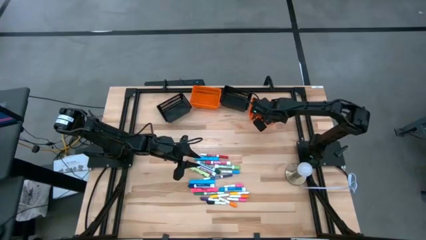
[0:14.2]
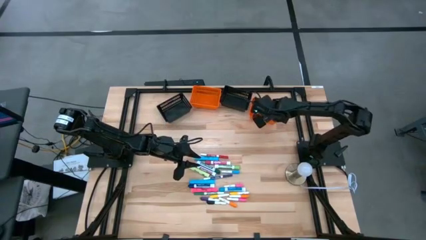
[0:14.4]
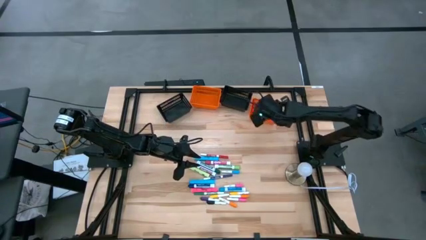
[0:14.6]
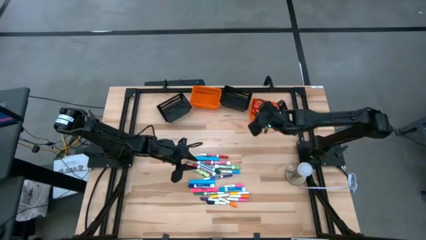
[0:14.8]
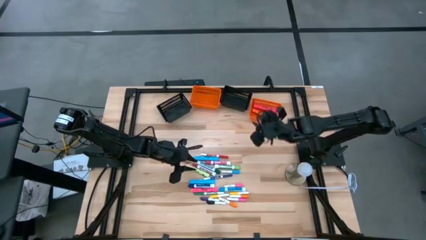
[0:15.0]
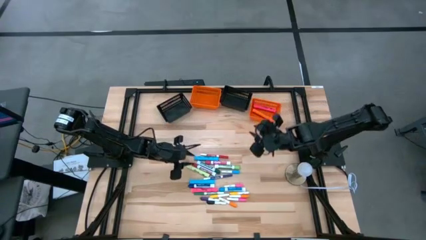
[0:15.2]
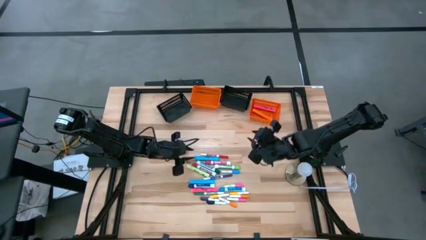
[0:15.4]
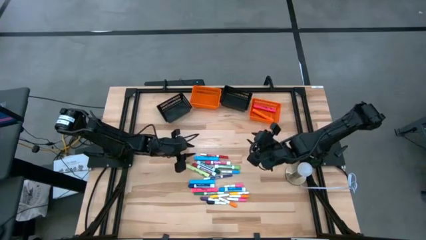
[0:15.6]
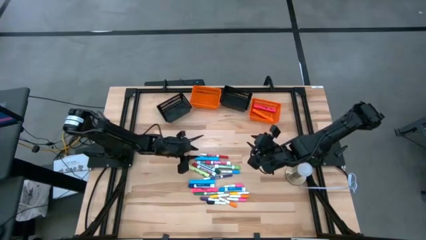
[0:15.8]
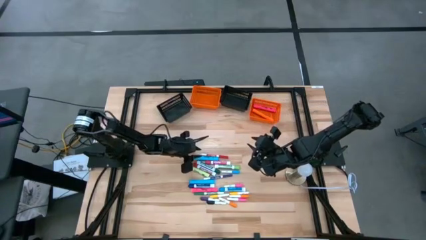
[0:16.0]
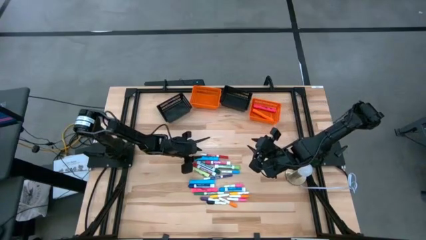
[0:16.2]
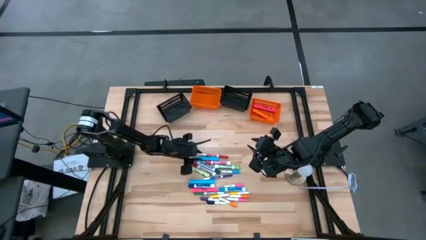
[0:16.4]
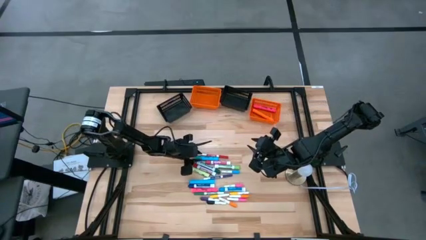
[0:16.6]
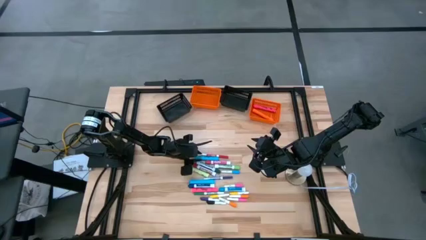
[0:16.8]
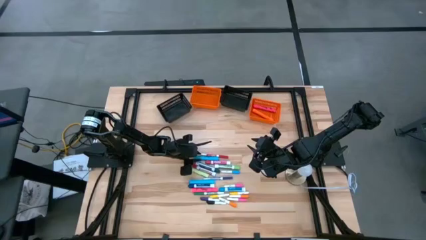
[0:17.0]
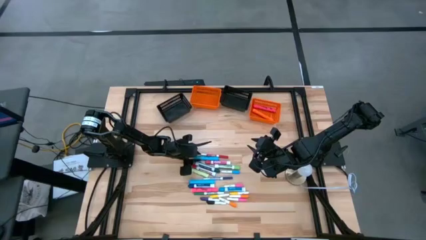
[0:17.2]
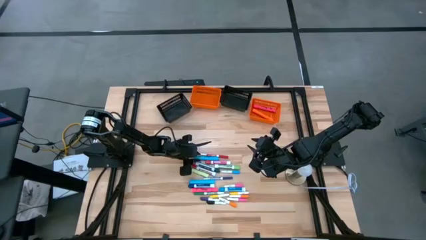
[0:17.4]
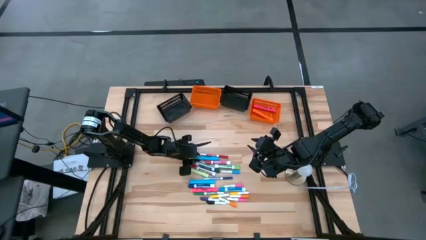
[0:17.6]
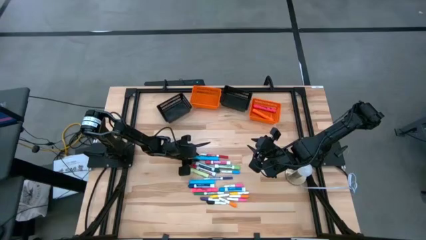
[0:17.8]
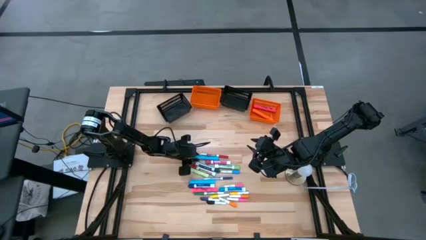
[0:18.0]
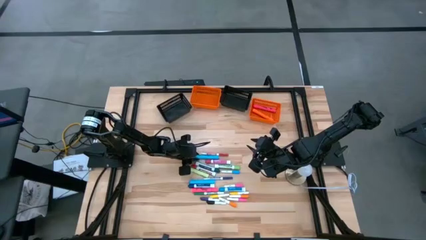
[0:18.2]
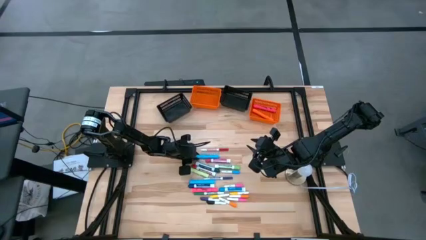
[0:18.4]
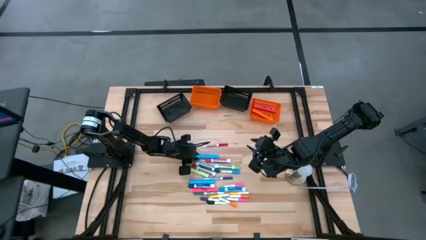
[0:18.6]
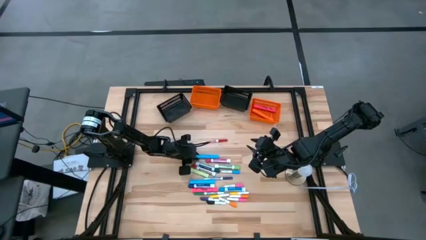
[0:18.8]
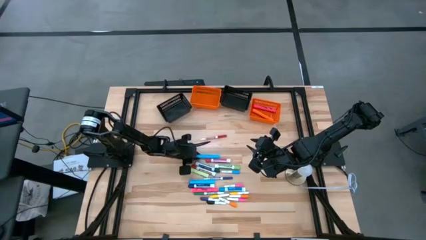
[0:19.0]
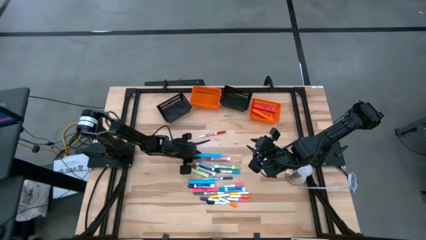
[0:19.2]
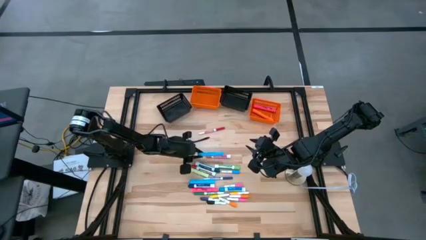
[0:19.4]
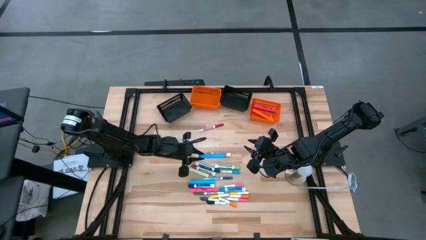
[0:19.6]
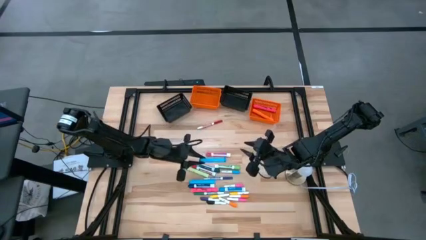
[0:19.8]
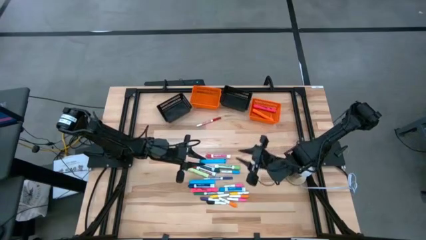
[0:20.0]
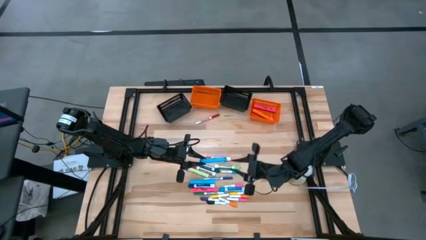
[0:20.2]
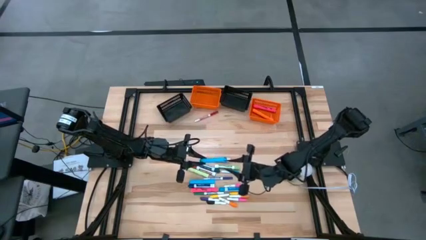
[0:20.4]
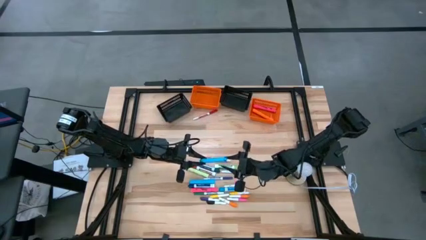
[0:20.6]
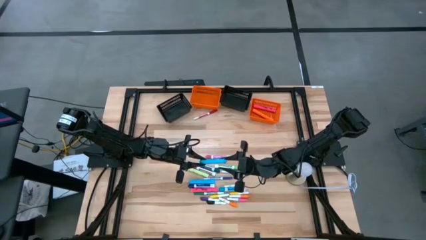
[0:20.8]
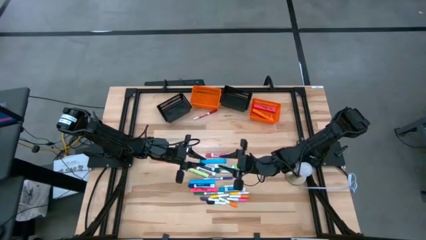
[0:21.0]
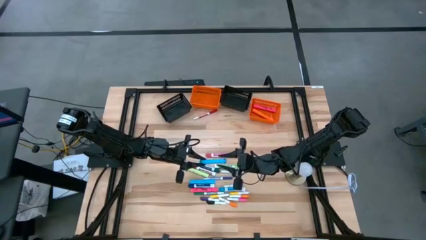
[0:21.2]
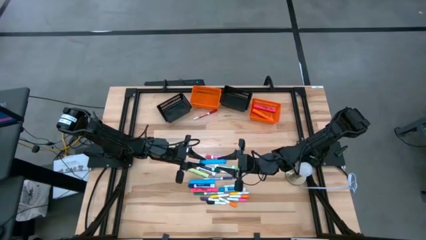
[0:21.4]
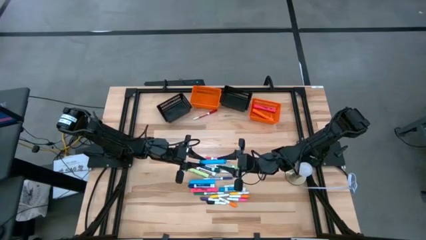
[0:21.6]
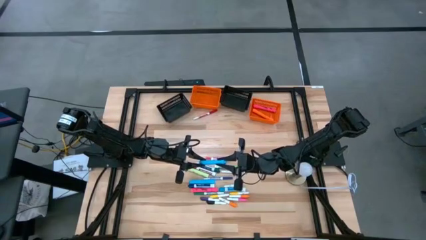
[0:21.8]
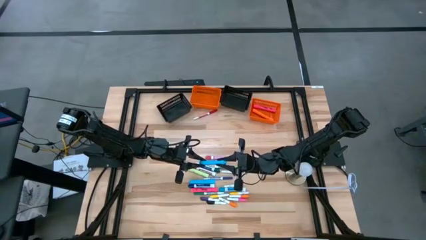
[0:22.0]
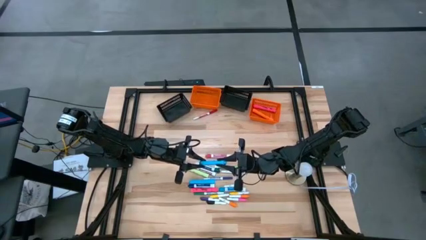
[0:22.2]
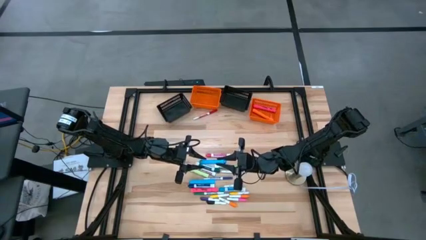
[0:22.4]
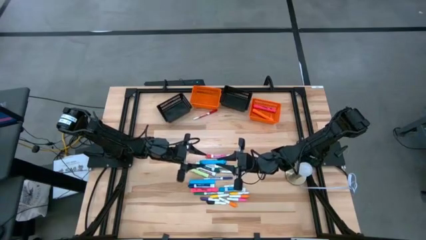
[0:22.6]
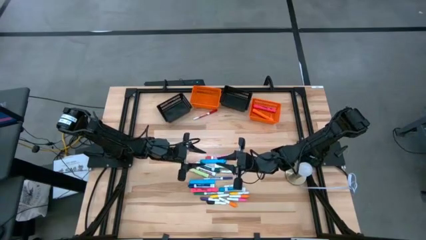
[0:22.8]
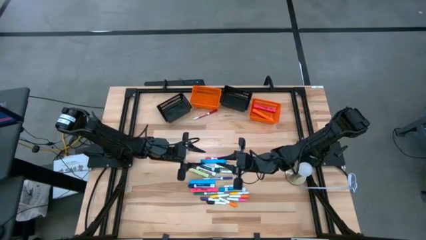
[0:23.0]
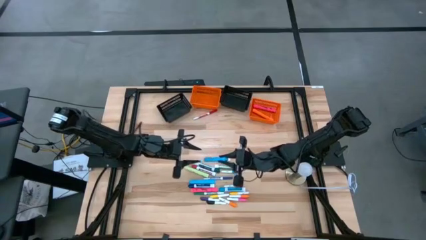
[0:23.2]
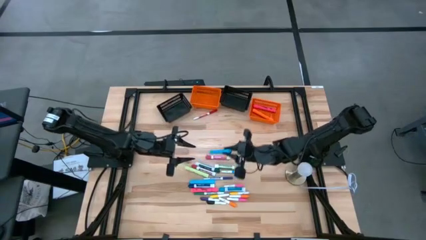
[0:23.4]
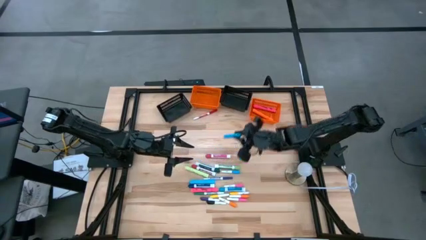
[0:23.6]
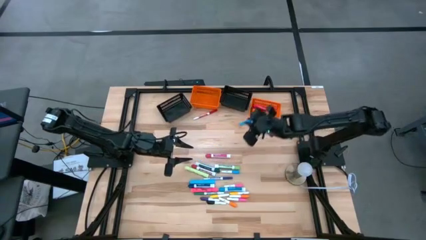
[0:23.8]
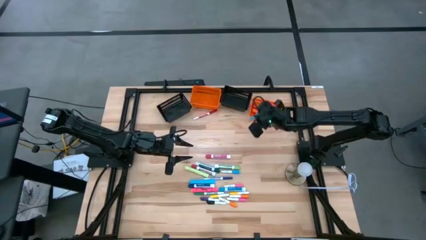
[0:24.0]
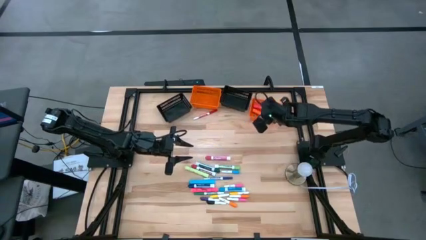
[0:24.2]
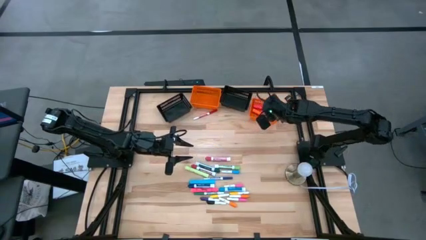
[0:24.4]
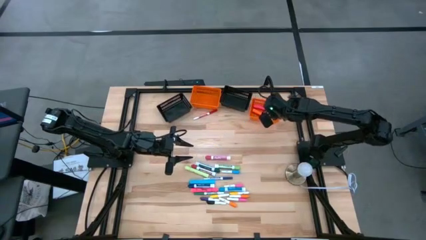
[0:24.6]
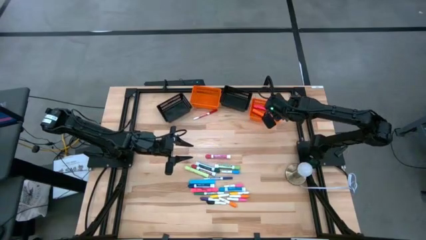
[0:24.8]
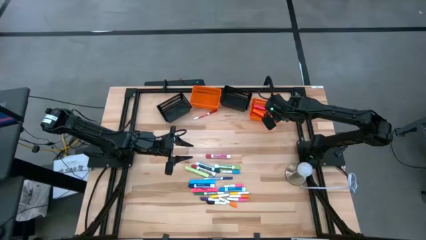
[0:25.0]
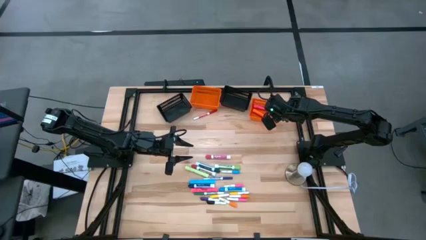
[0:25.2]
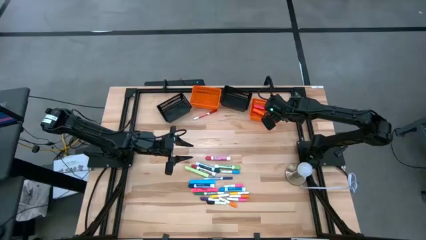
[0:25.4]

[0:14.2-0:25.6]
Task: Pick & Place Markers
Put the large light blue highlighter into the right orange bin

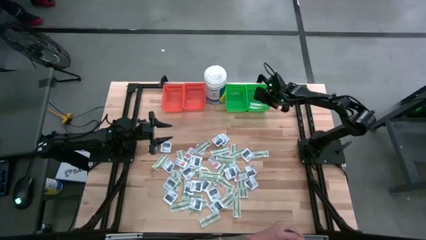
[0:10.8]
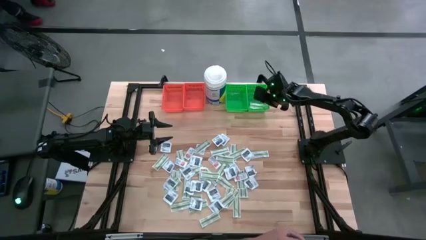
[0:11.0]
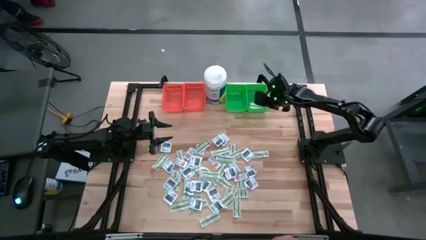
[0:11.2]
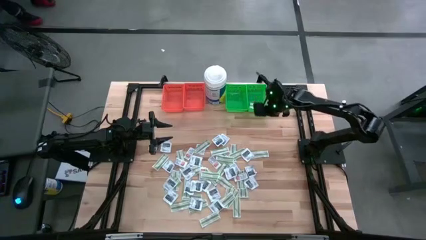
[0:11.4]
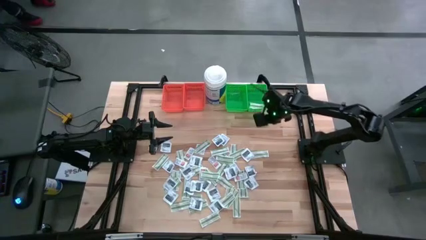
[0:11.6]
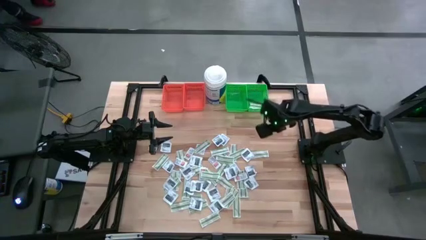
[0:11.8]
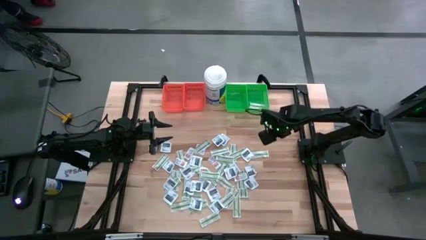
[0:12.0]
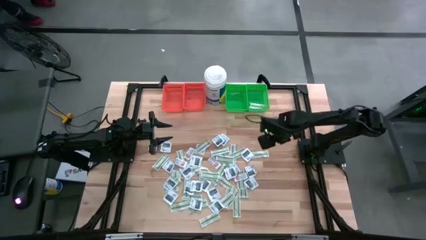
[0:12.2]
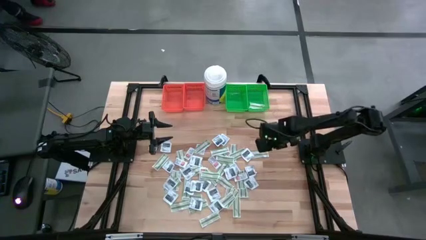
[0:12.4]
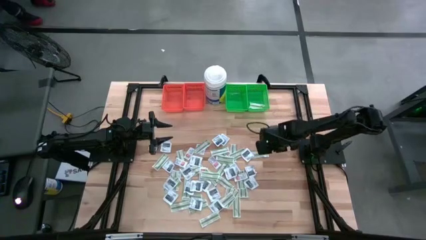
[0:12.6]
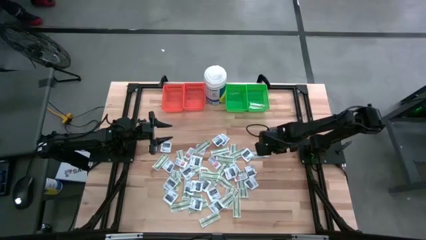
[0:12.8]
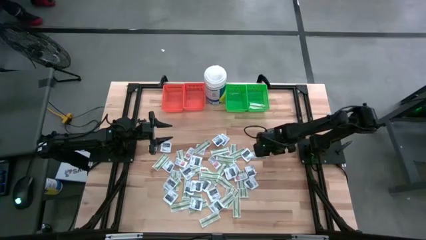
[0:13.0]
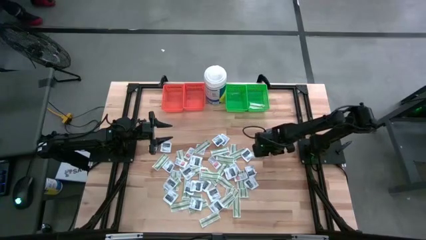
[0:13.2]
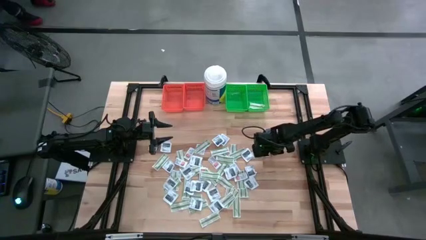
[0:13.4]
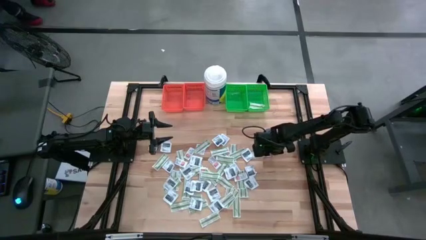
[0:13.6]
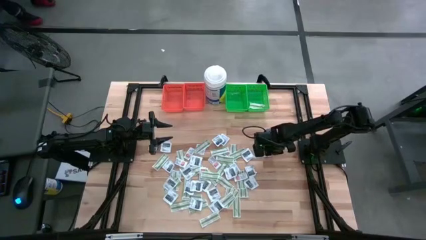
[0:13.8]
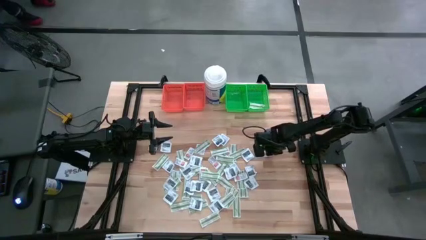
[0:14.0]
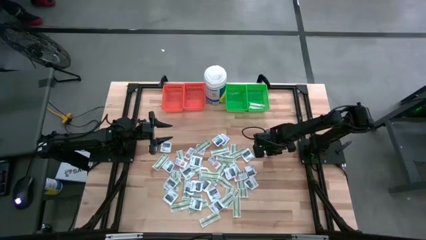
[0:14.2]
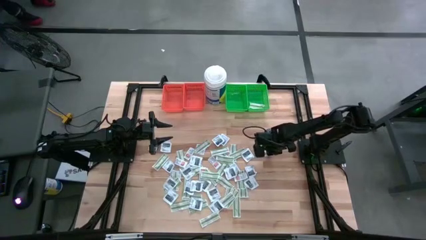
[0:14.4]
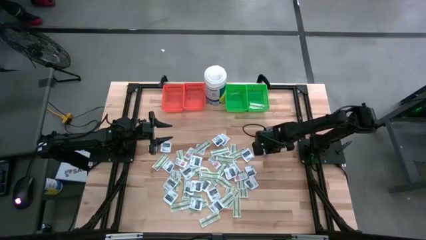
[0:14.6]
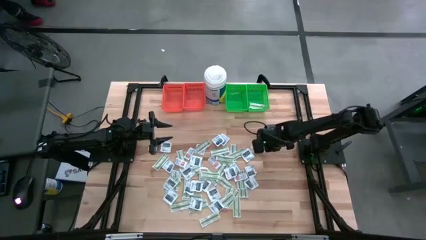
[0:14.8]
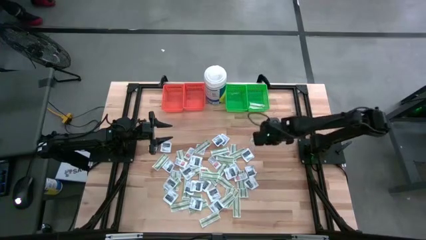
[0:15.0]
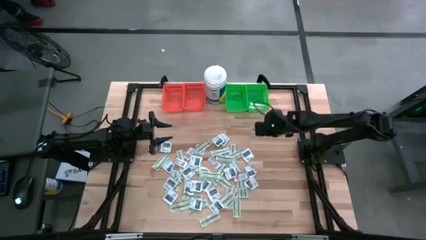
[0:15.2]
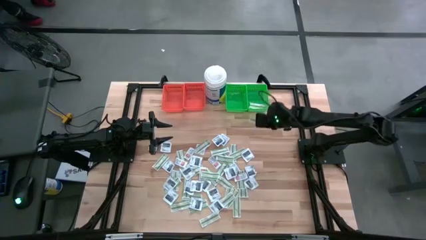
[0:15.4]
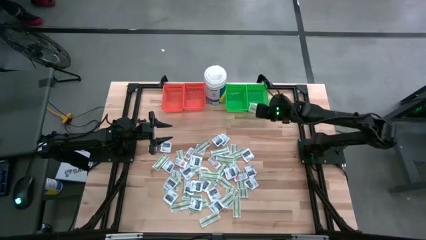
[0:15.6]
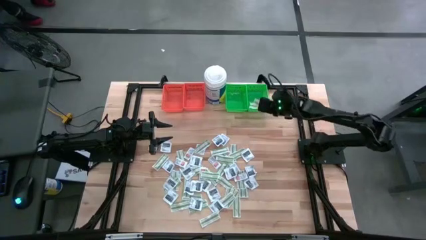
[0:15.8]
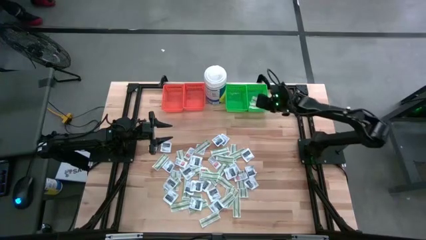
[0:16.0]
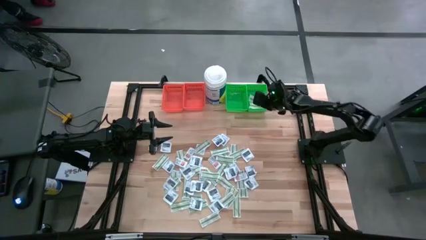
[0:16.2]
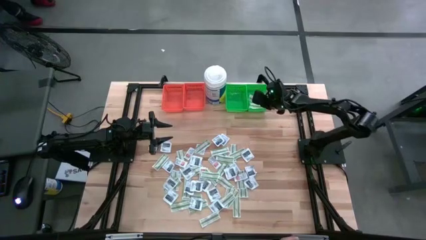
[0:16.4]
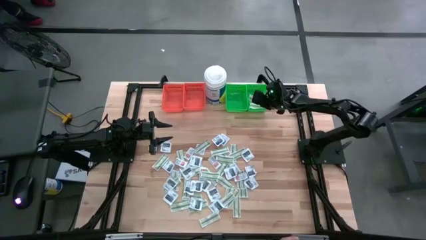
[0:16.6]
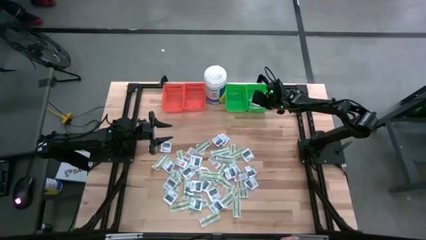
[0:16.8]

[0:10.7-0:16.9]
Task: Pick & Place First Aid Supplies
Put the green bandage pack into the right green bin
